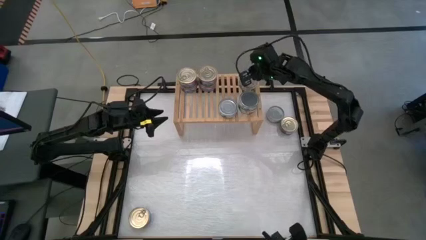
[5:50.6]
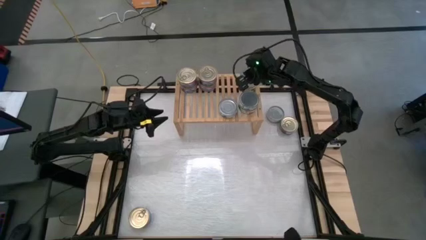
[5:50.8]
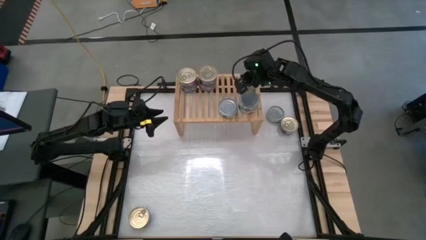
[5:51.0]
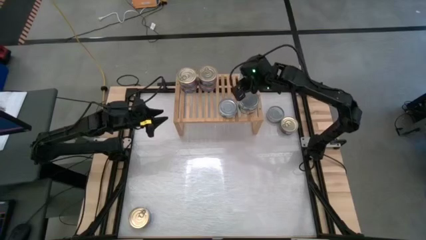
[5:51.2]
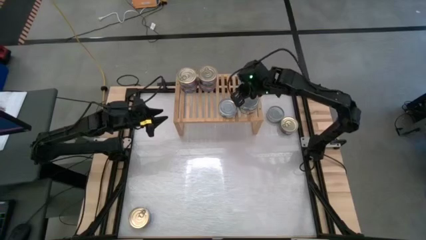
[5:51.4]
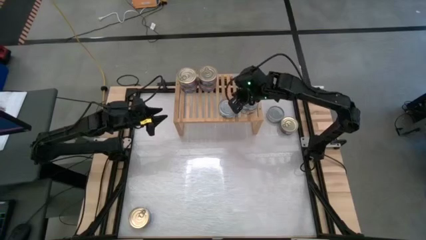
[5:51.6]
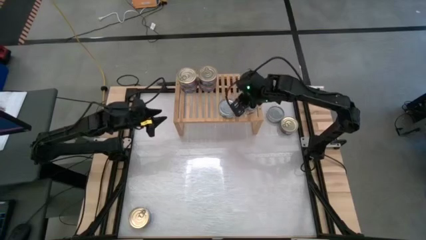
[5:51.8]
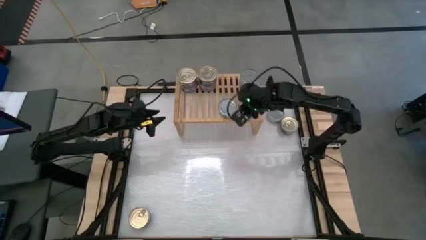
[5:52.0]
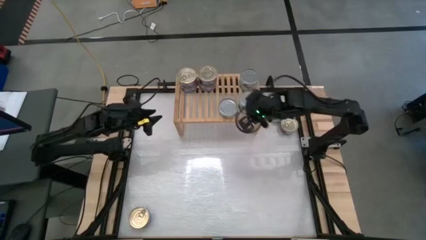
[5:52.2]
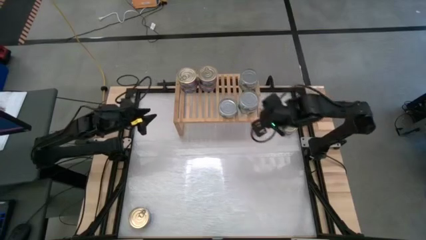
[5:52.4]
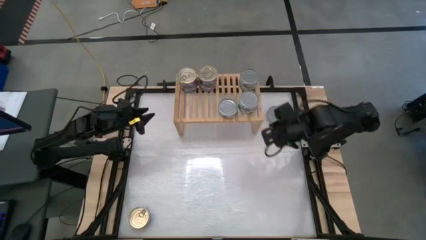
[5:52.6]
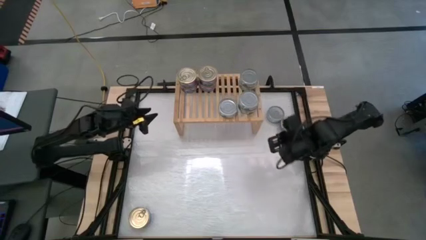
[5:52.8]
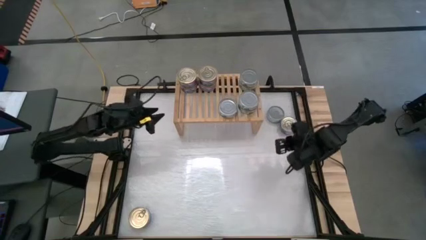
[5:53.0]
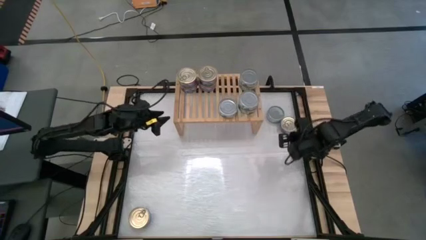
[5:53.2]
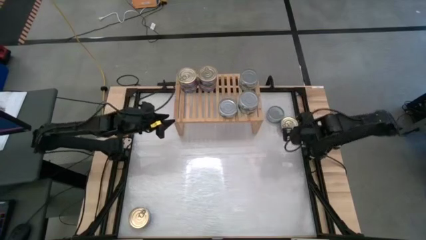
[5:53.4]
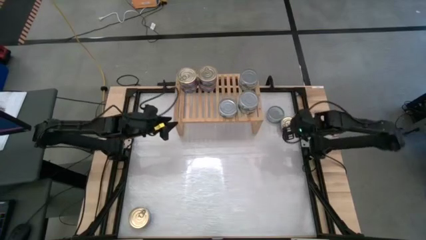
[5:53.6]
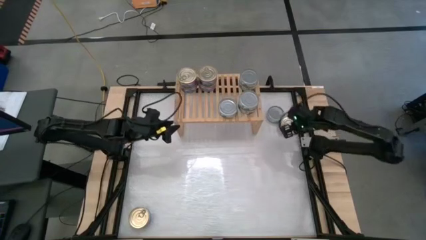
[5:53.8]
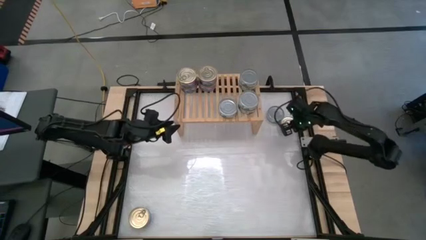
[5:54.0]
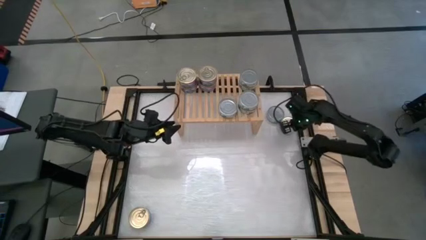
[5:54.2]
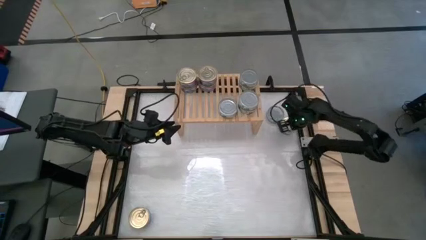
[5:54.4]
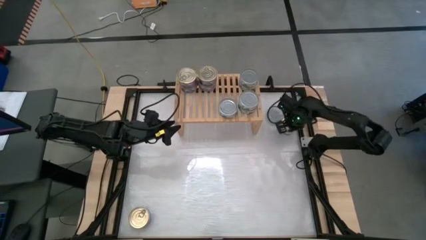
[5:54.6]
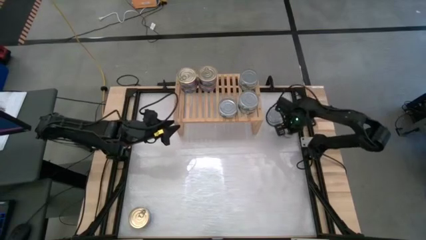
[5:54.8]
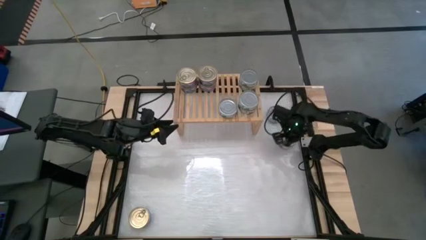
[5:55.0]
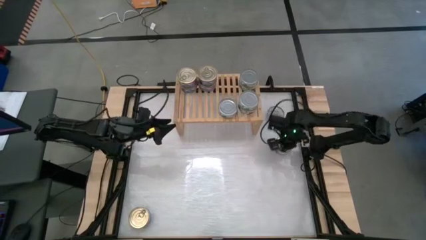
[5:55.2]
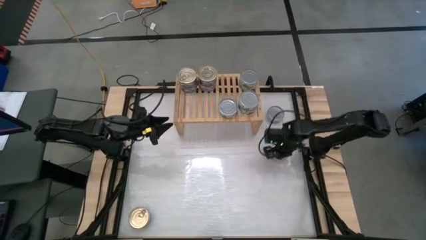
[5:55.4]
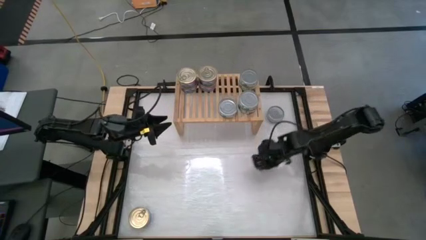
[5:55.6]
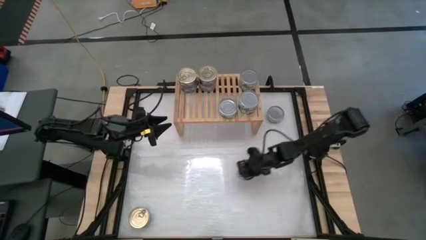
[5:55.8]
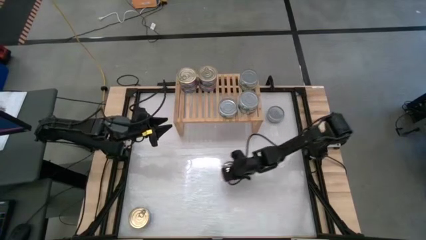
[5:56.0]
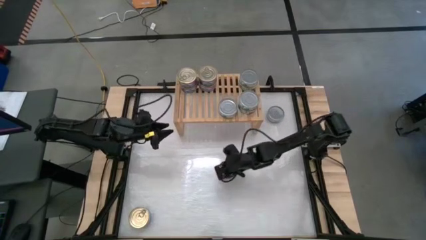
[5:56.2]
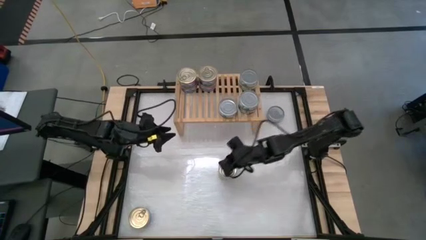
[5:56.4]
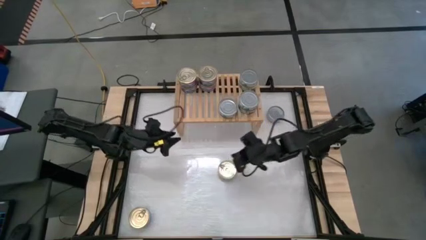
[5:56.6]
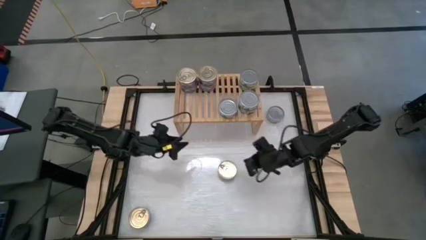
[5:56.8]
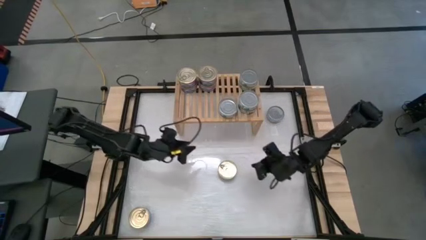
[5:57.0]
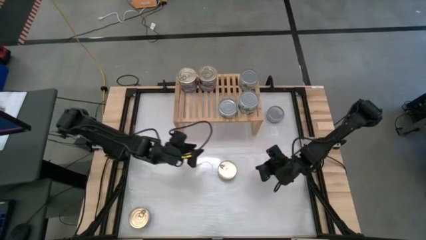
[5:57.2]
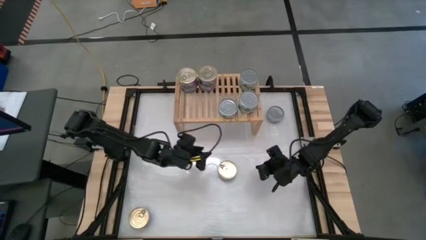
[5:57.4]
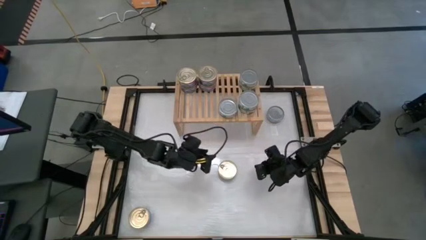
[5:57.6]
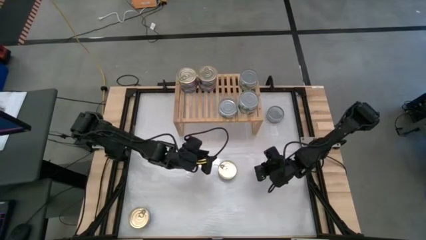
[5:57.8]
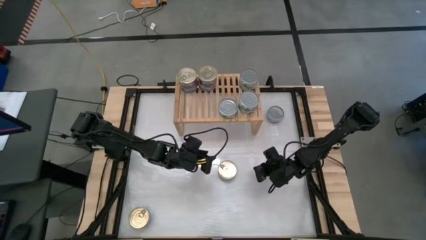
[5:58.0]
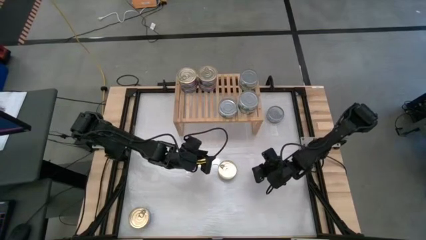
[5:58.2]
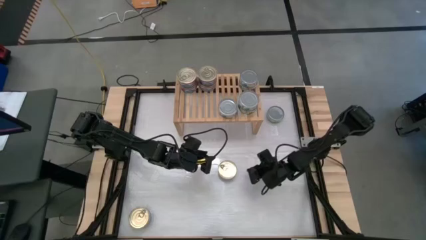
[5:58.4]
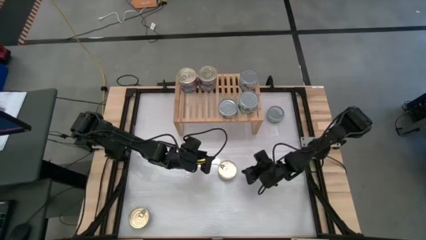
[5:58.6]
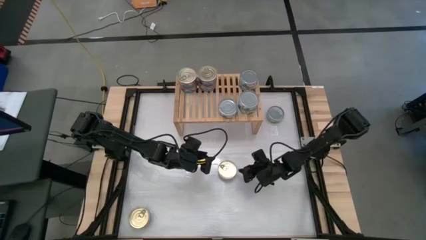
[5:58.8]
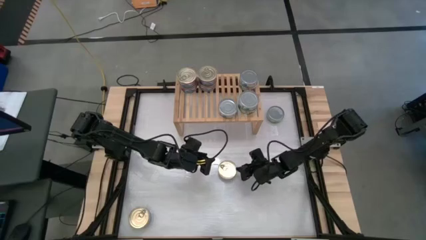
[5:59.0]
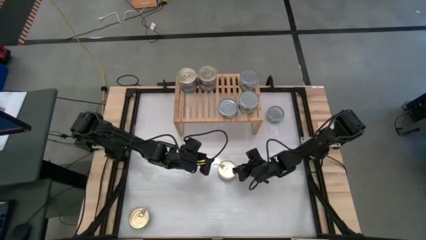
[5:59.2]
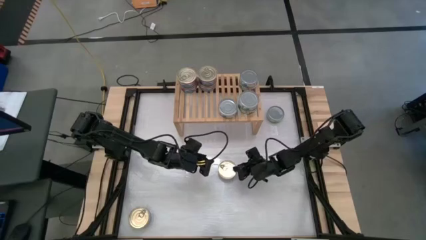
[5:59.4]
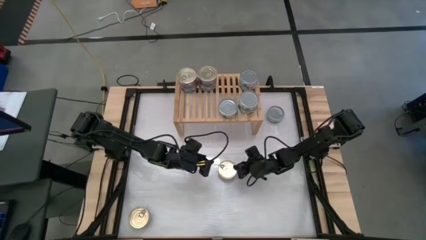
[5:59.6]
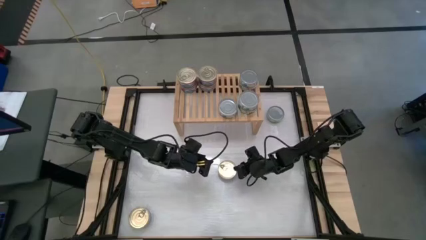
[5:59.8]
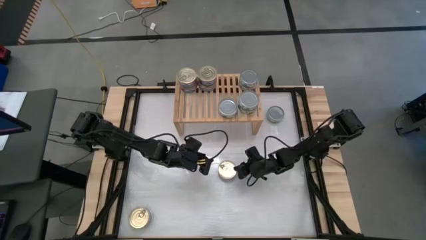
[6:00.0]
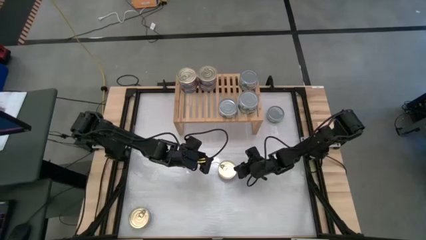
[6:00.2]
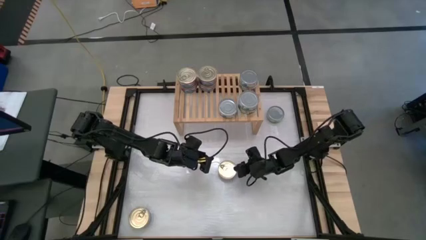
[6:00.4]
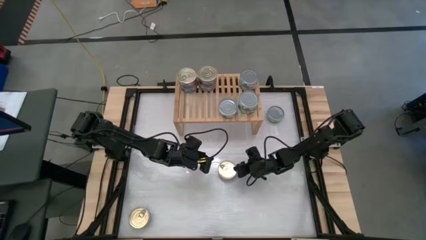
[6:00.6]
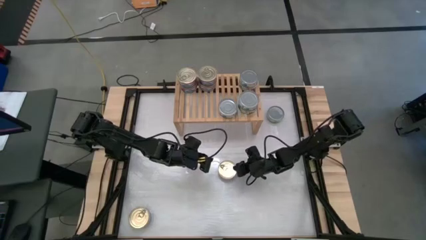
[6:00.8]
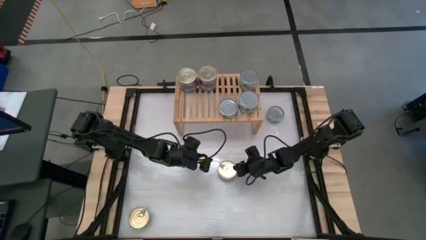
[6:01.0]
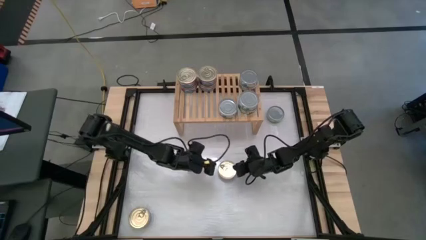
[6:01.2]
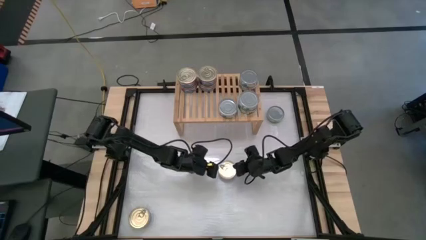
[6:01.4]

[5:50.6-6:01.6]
Task: Stack canned seafood by type on shelf
Put the blue-pink tuna can on the shelf aligned with the other blue-pink tuna cans
